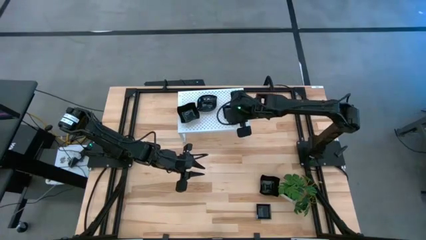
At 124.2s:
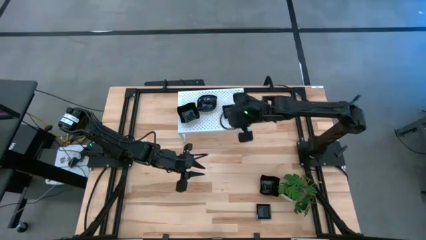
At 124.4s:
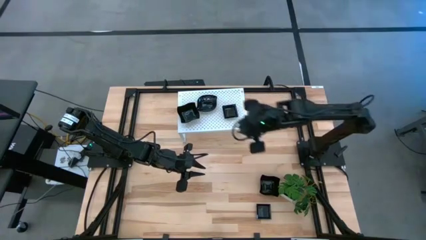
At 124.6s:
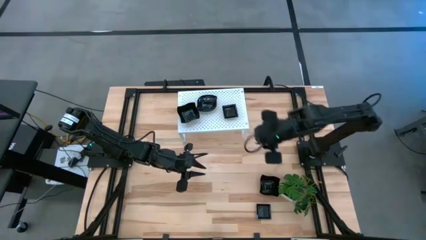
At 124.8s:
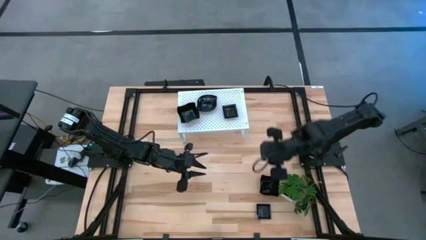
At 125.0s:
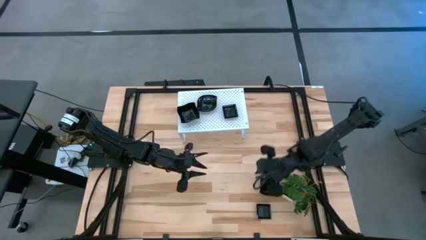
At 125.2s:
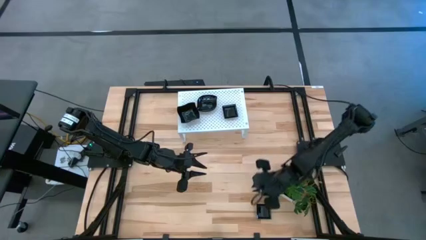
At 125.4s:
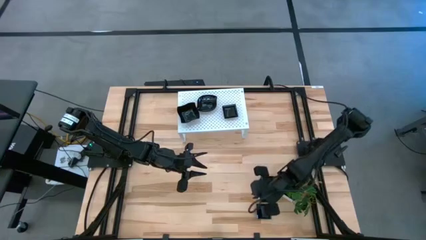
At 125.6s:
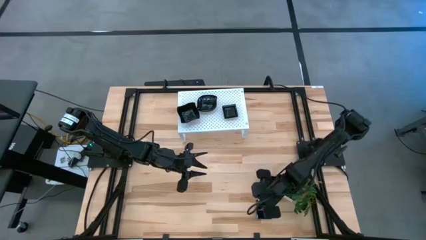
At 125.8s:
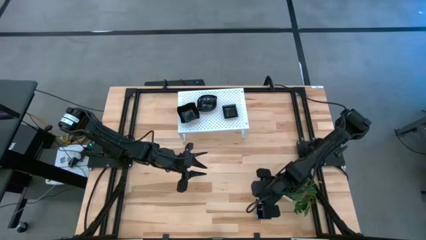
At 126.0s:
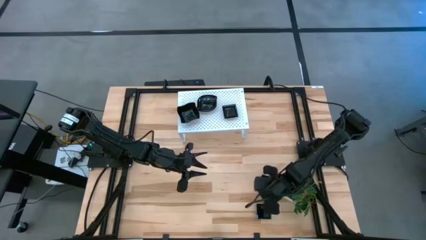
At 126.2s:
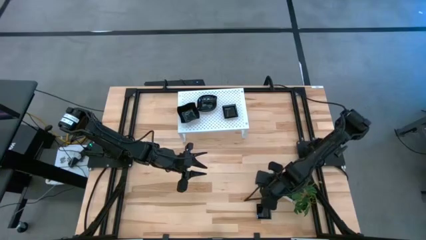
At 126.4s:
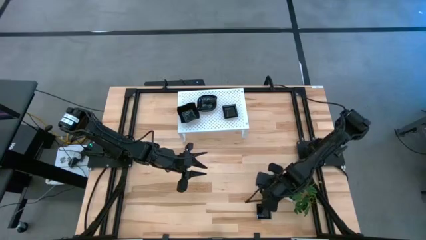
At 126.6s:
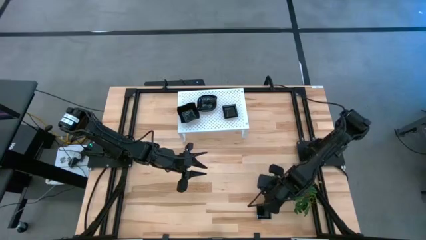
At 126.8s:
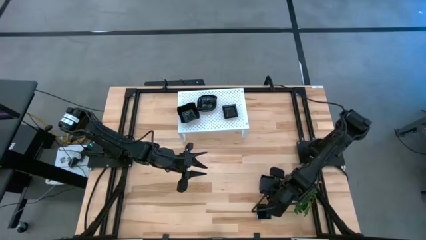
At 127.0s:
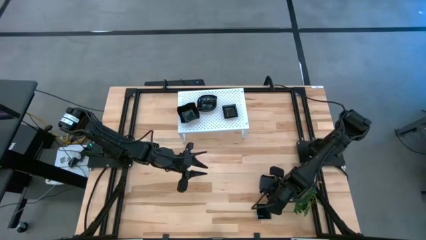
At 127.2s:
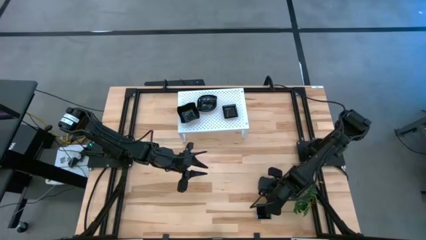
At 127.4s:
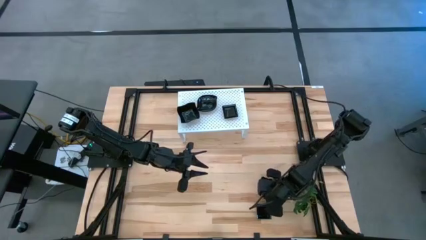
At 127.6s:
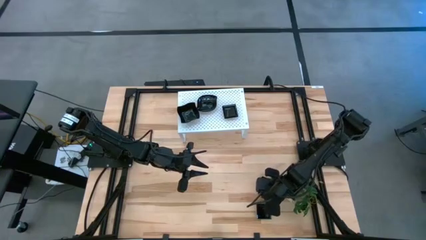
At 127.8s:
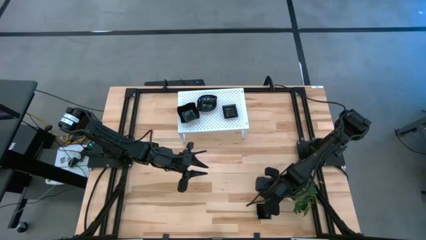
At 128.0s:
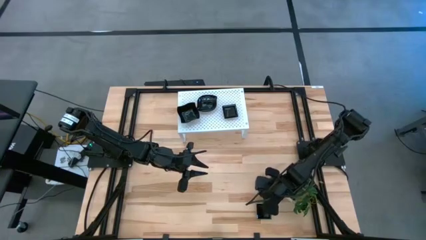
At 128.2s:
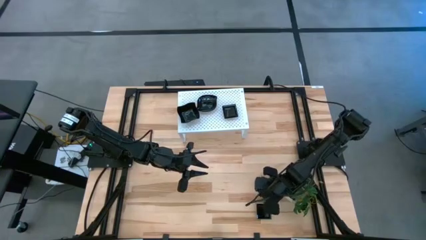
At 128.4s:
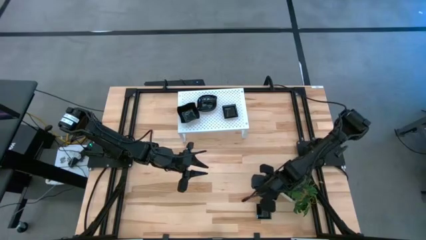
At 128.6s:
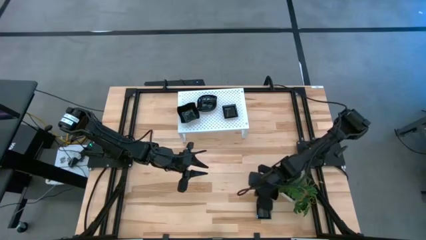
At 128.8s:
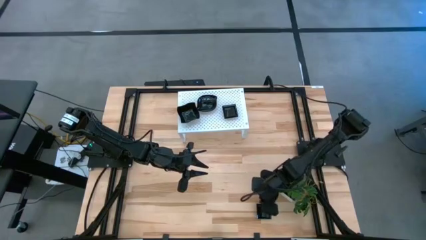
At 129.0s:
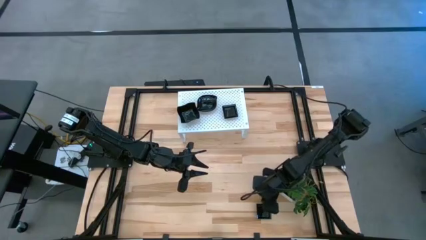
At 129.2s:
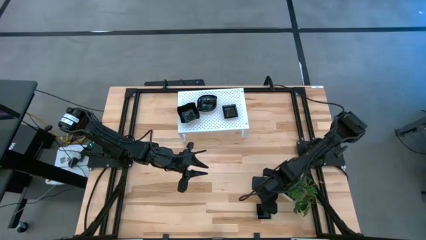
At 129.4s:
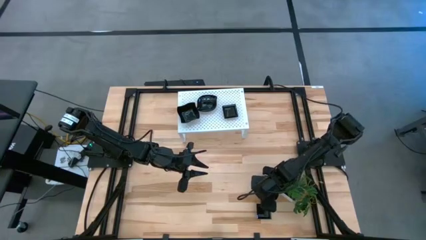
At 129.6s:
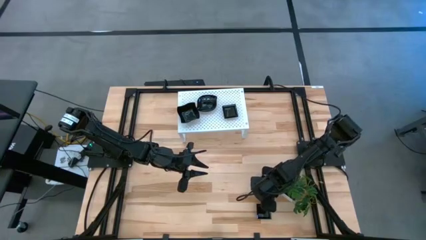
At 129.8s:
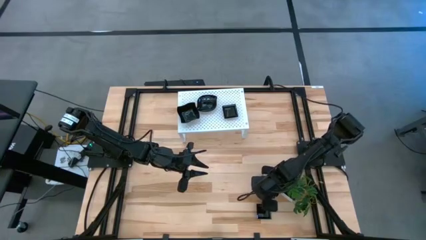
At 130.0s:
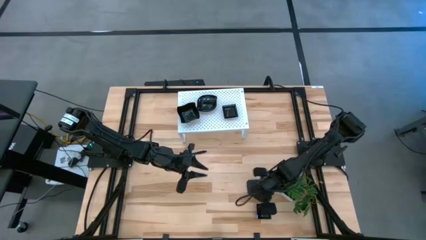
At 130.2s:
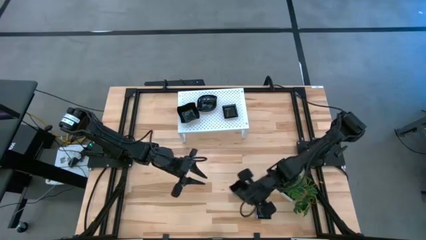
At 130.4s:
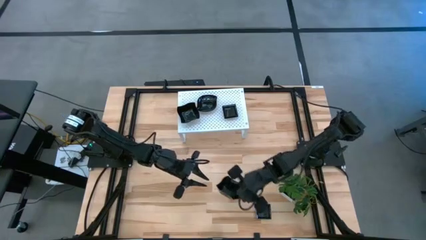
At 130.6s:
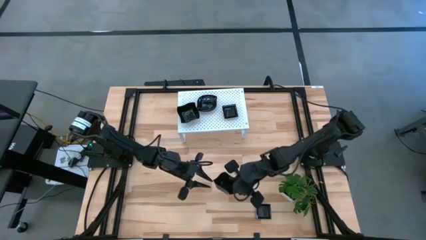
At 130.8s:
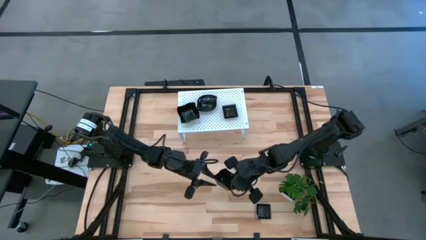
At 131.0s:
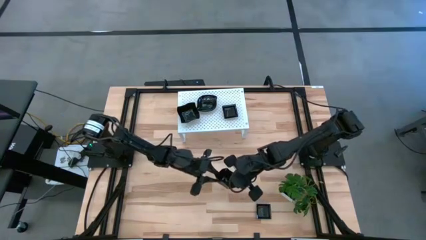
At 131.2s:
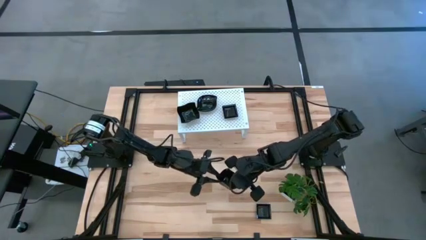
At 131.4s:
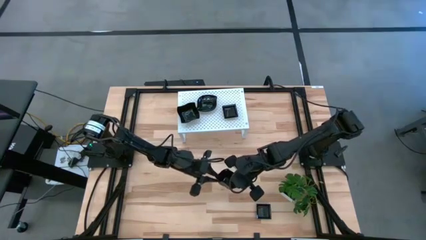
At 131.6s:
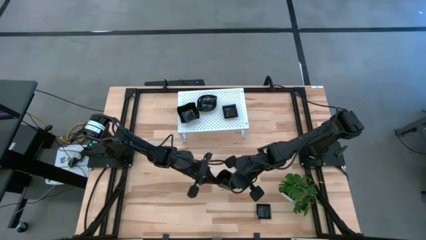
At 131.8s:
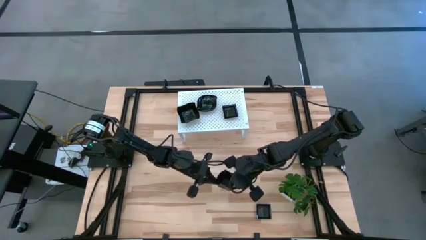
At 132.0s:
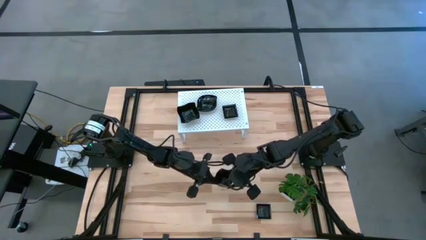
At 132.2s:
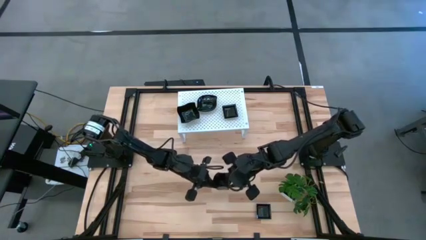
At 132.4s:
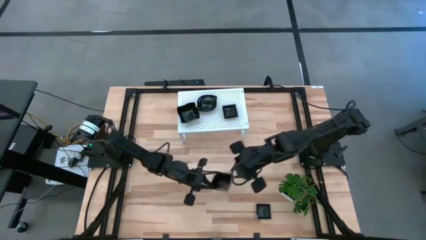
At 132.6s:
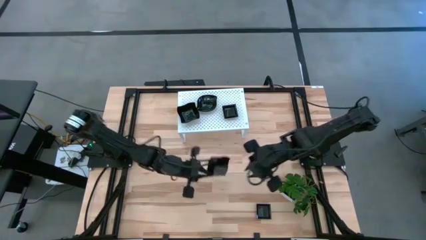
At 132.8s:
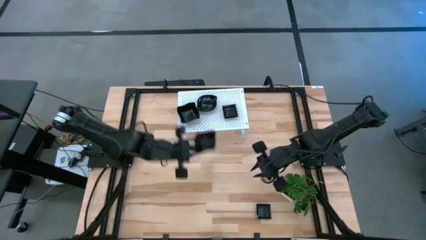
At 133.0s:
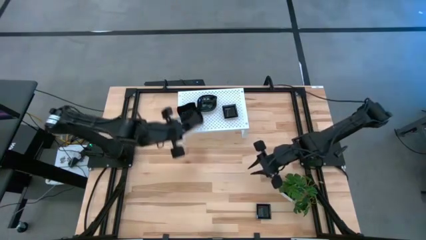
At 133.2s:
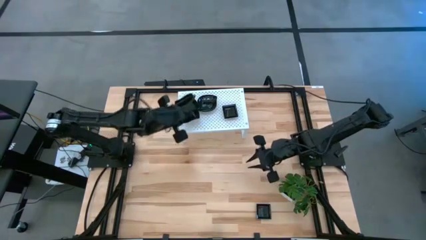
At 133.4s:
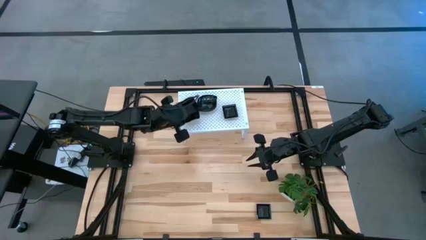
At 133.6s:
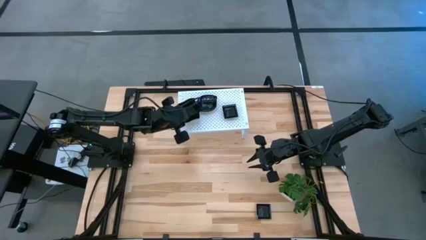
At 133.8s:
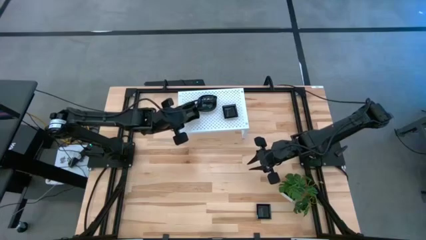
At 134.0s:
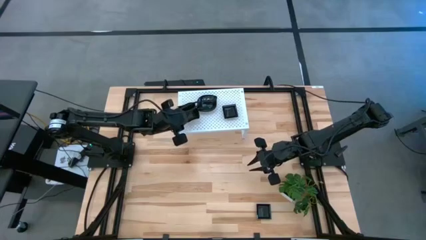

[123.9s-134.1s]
Task: Pick & Place Mini shaped plates
Stack the black distorted square plate on top of the black distorted square plate on the shelf

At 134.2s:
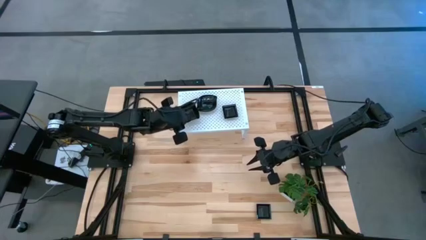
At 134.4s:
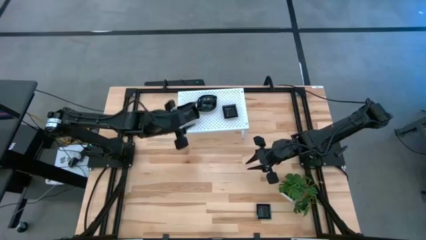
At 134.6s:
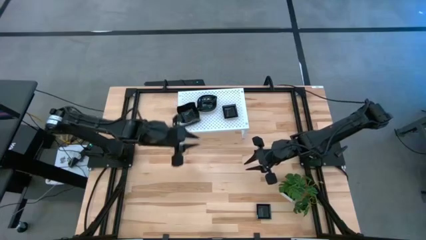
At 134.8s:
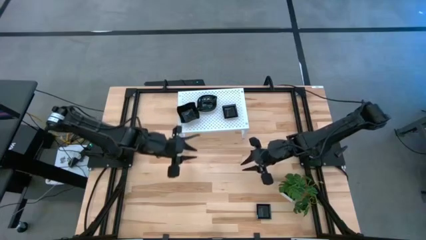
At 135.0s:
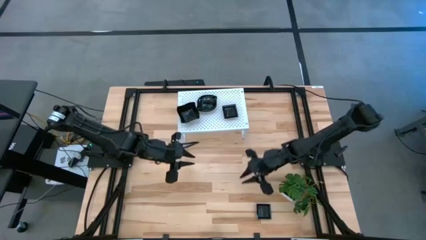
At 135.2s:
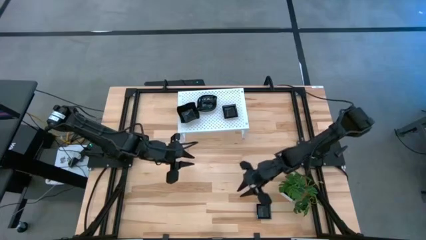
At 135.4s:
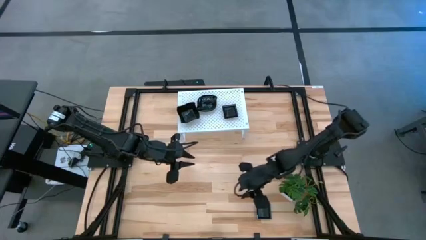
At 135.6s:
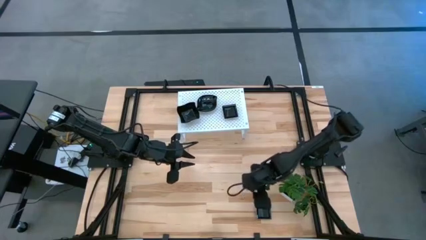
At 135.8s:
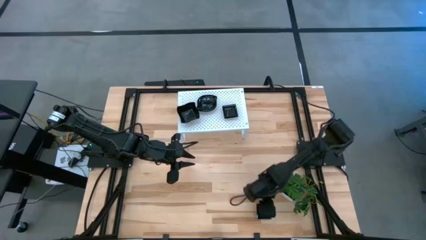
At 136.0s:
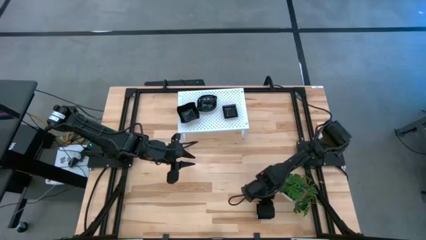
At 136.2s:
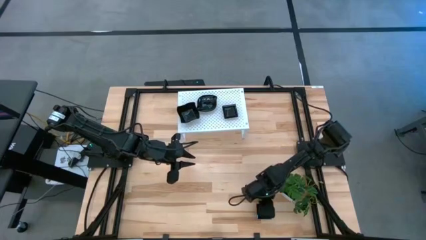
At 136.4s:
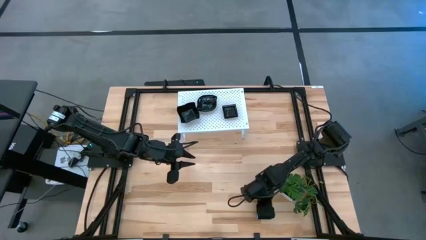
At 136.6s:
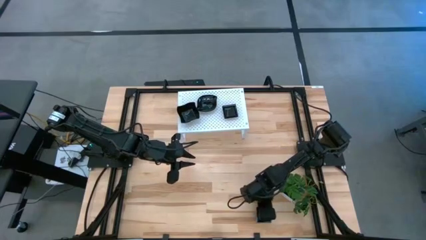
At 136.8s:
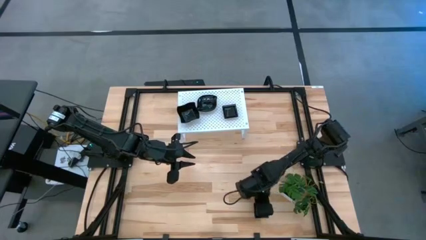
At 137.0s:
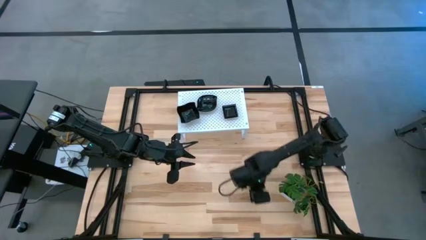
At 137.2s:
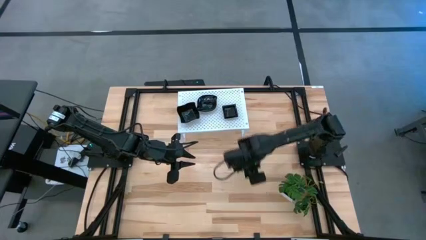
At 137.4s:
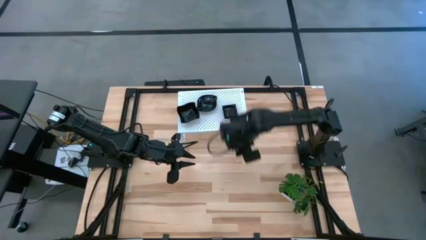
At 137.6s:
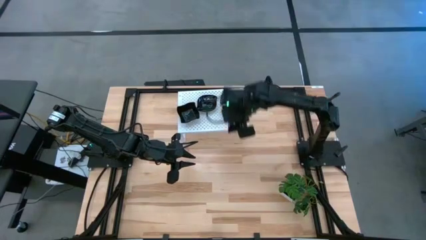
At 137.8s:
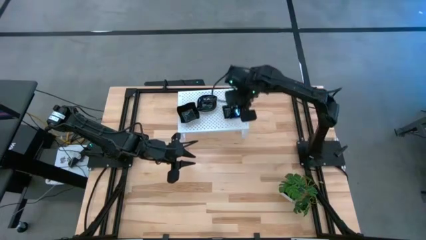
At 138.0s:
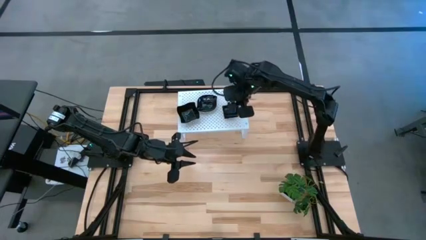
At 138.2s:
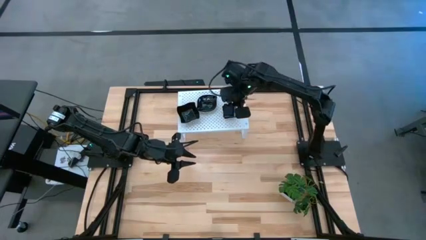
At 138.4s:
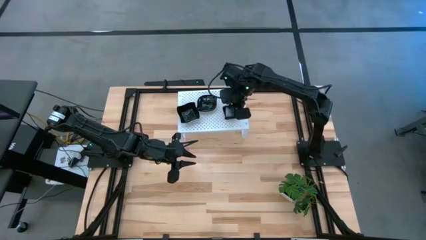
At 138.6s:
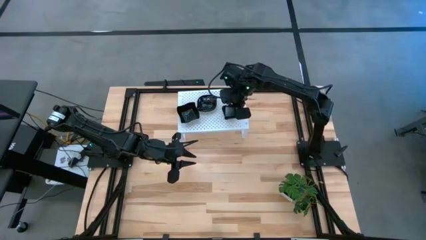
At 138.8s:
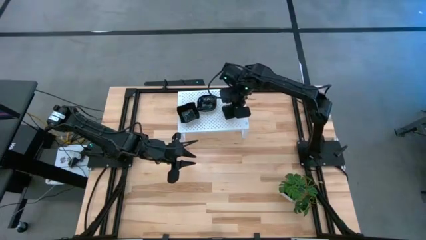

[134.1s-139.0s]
Stack the black square plate on top of the black square plate on the shelf

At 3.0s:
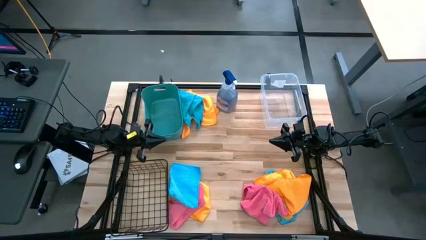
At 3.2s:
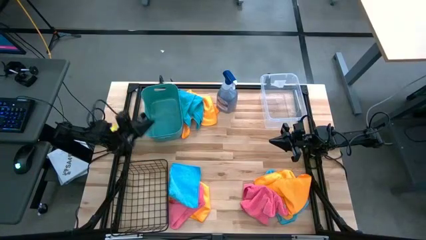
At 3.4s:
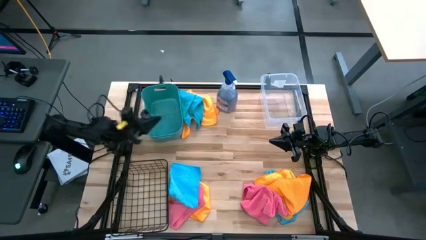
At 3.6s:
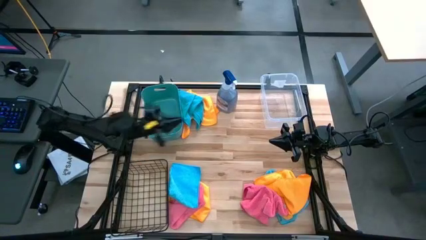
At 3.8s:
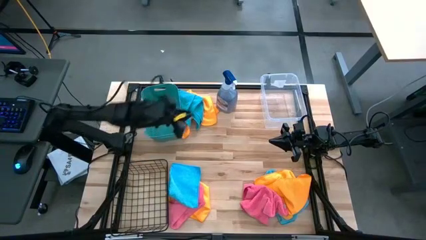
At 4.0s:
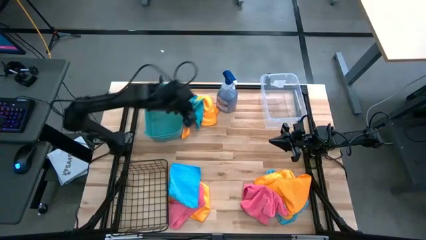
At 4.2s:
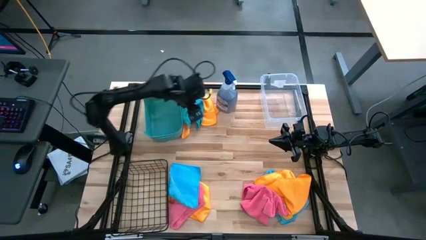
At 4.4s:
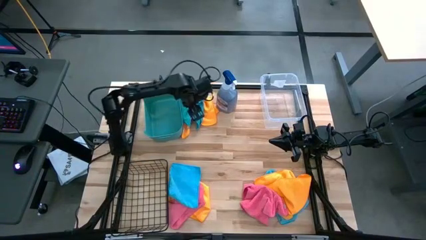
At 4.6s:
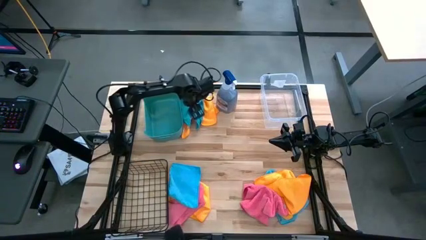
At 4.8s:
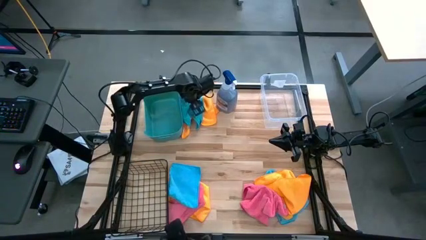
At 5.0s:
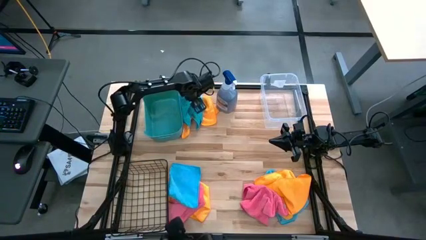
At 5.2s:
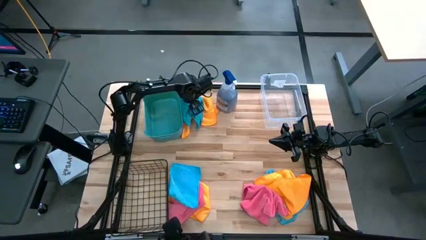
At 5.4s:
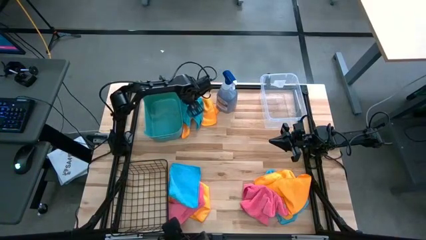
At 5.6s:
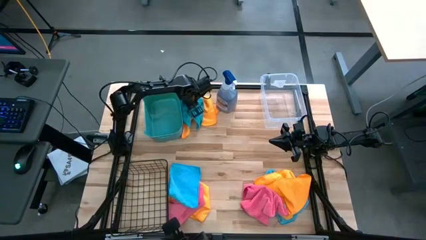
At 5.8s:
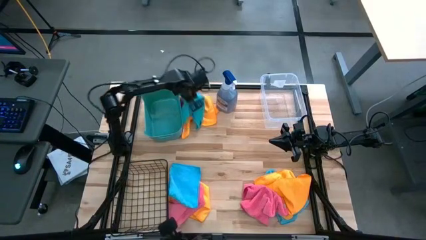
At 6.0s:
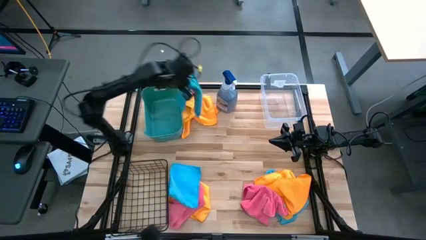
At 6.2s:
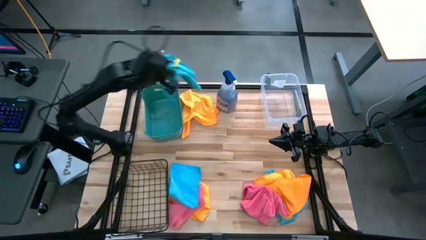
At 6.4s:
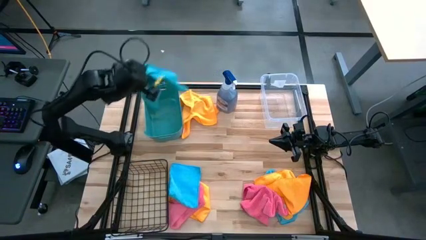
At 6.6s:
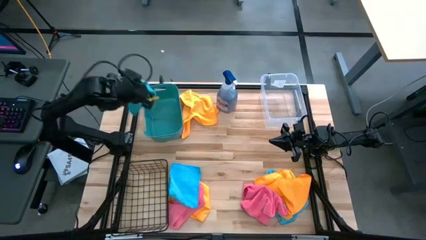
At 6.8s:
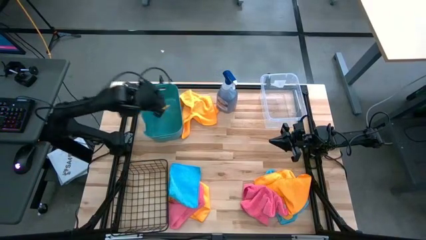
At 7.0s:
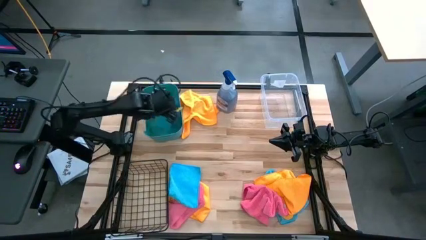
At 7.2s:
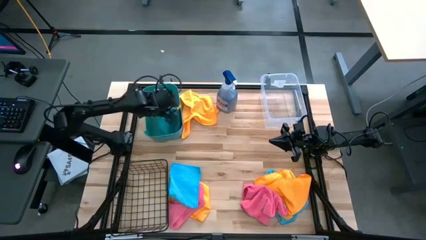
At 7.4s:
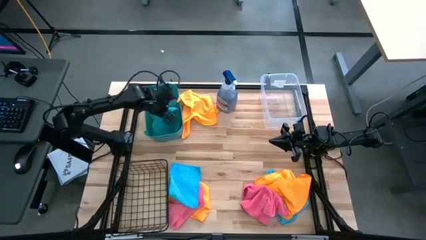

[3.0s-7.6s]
Task: Sort microfiber towel by color & place in baskets
Put the top left blue towel into the green bin
